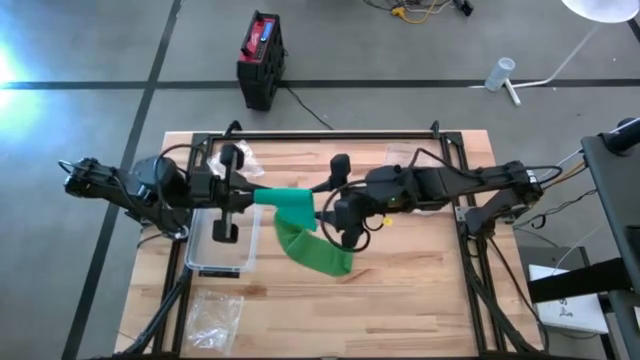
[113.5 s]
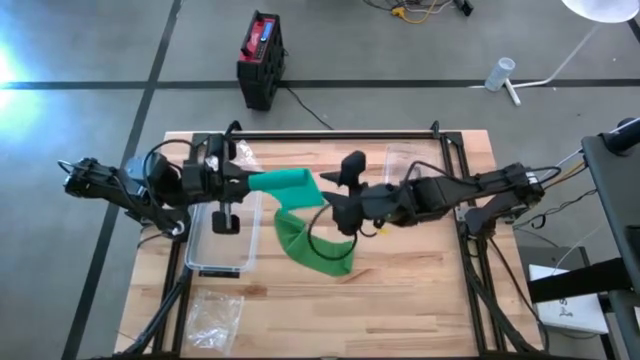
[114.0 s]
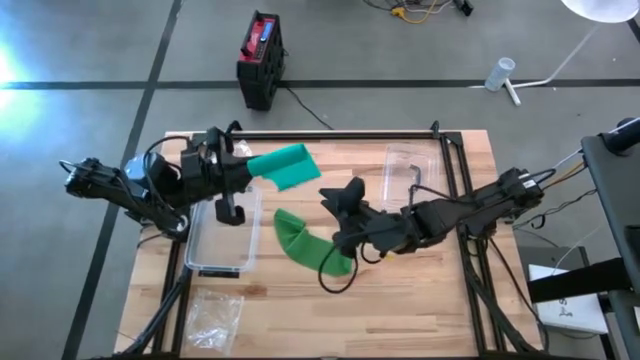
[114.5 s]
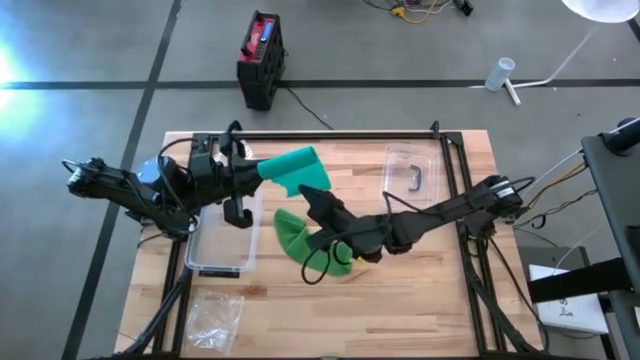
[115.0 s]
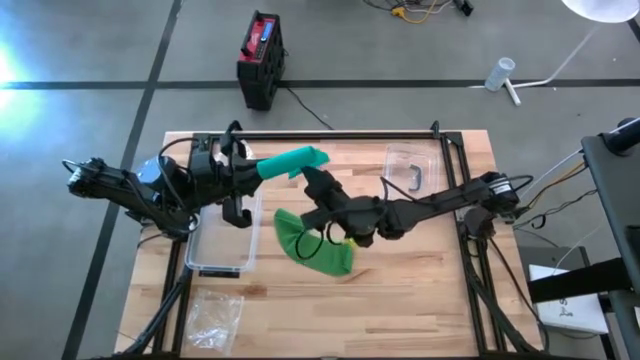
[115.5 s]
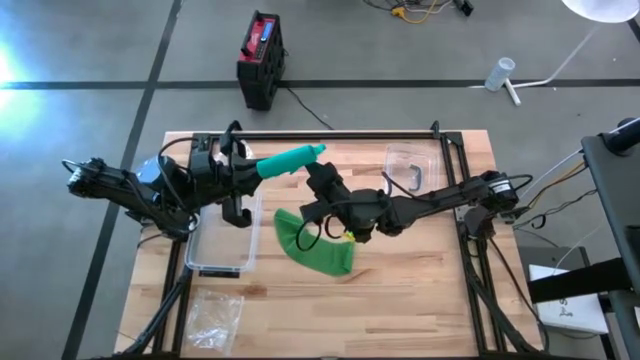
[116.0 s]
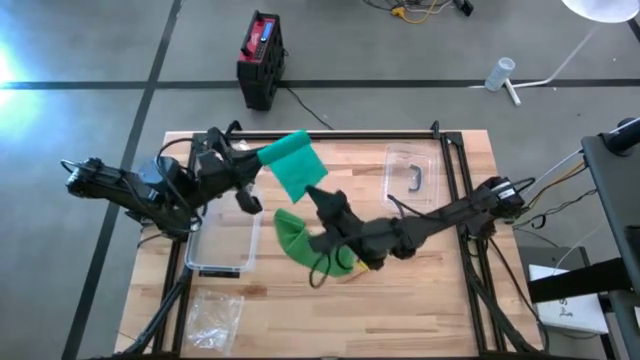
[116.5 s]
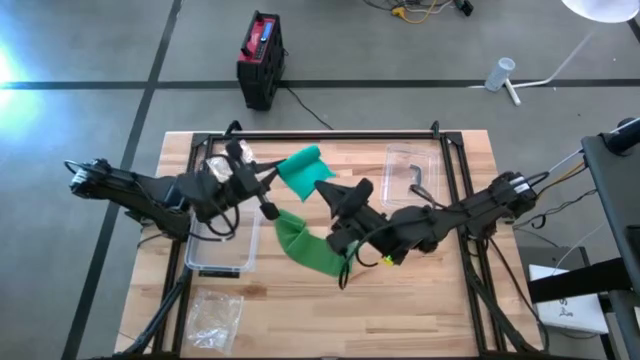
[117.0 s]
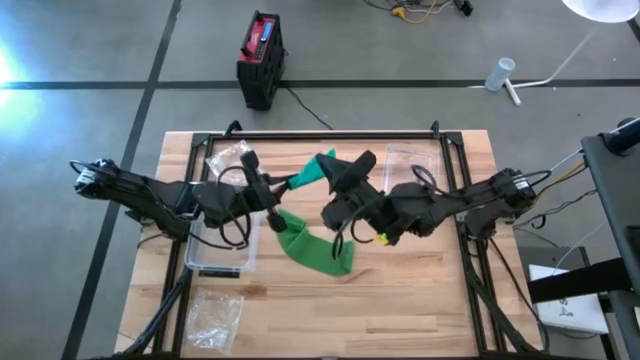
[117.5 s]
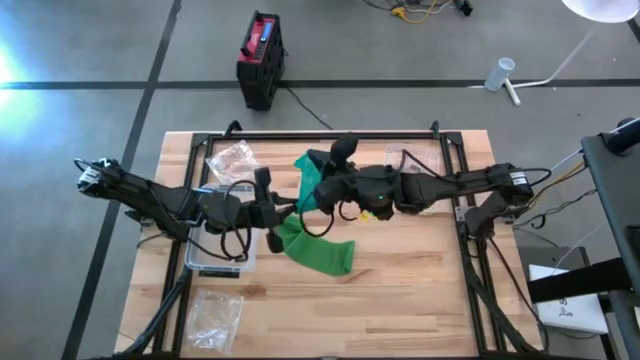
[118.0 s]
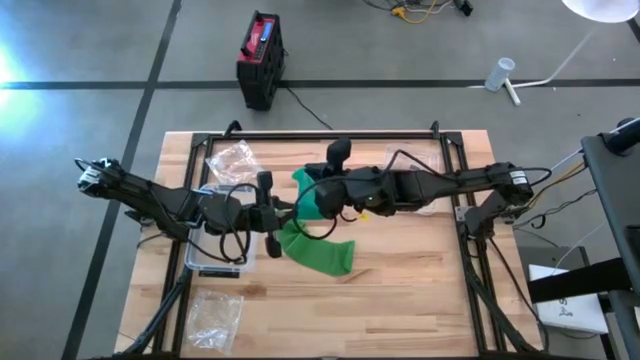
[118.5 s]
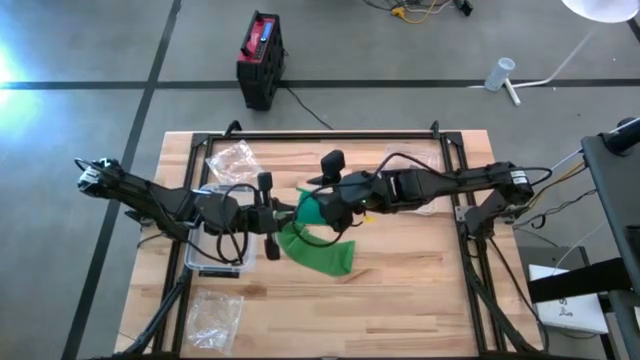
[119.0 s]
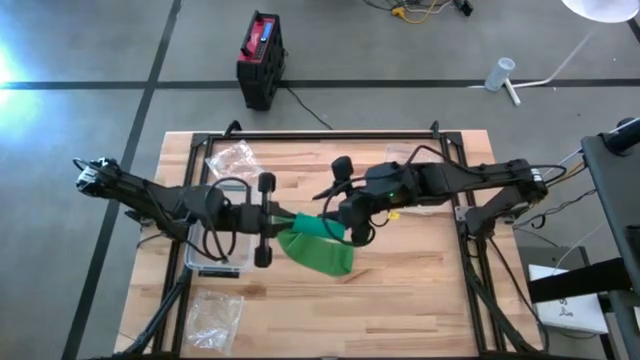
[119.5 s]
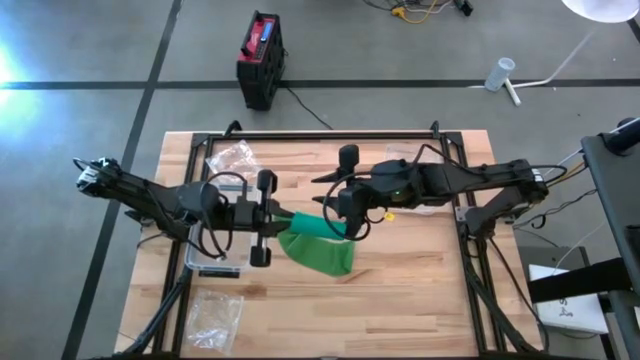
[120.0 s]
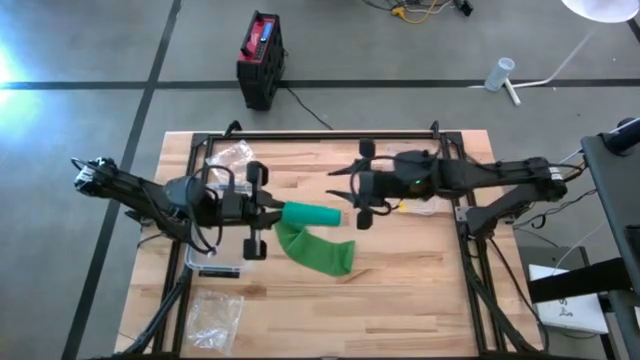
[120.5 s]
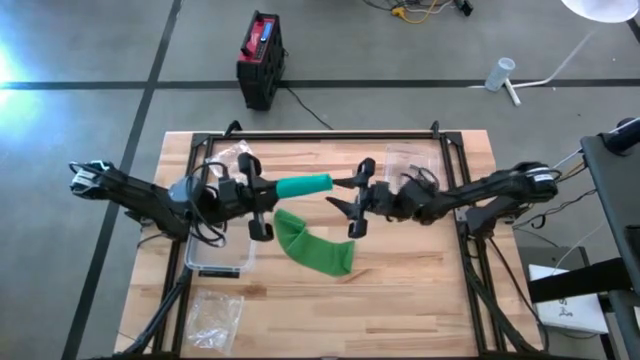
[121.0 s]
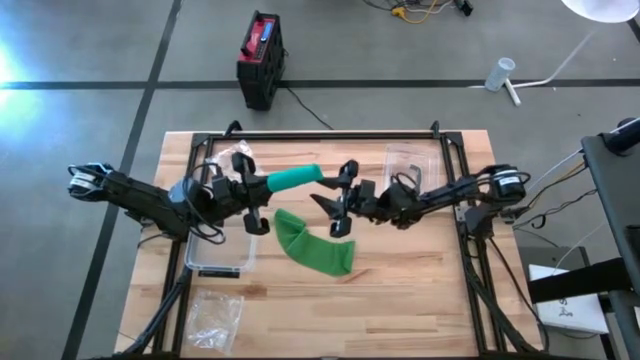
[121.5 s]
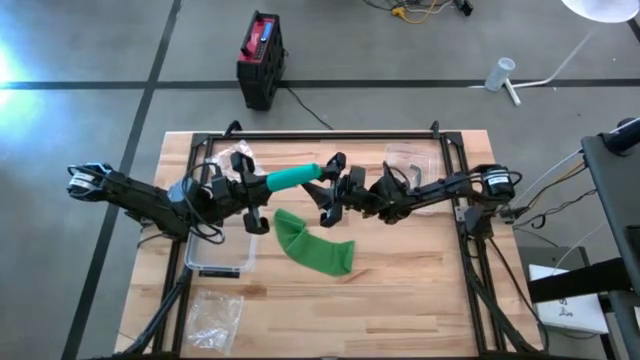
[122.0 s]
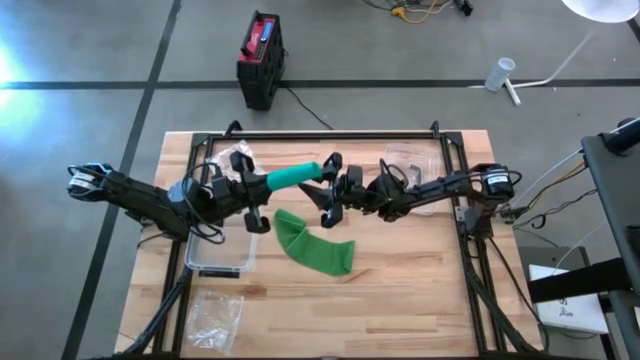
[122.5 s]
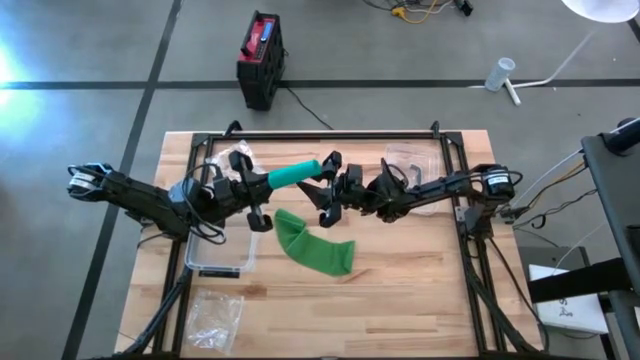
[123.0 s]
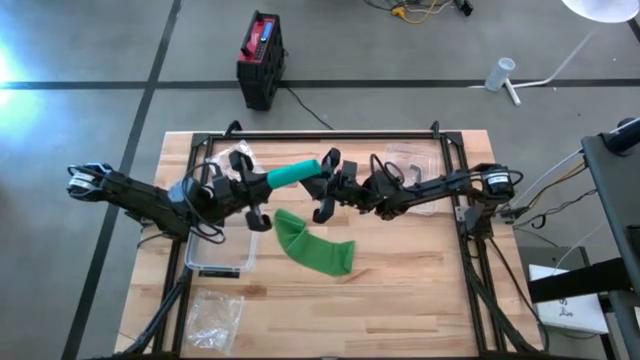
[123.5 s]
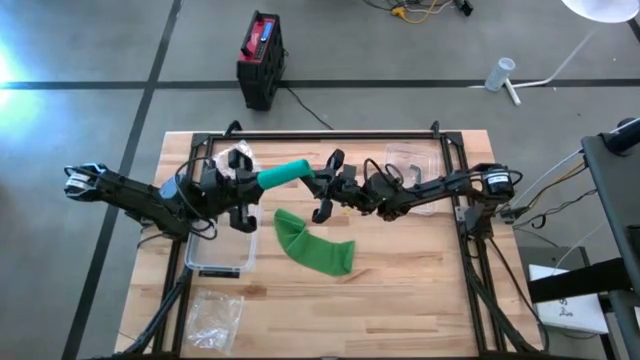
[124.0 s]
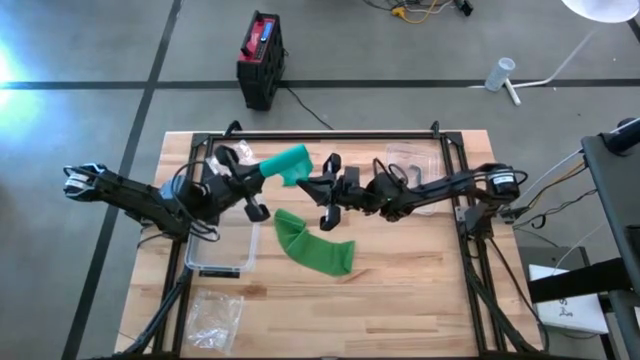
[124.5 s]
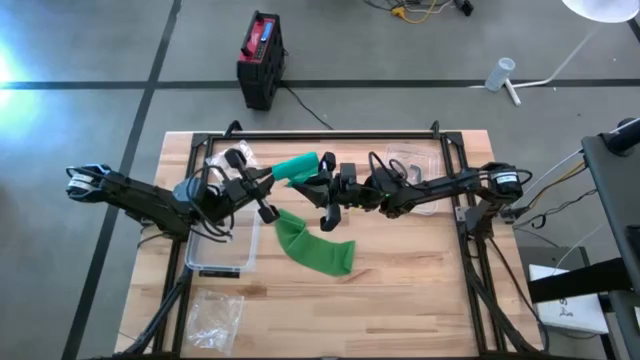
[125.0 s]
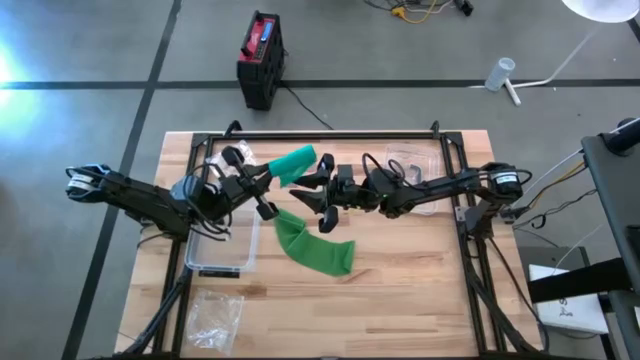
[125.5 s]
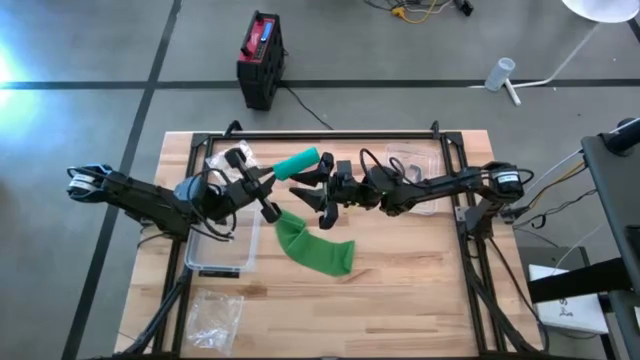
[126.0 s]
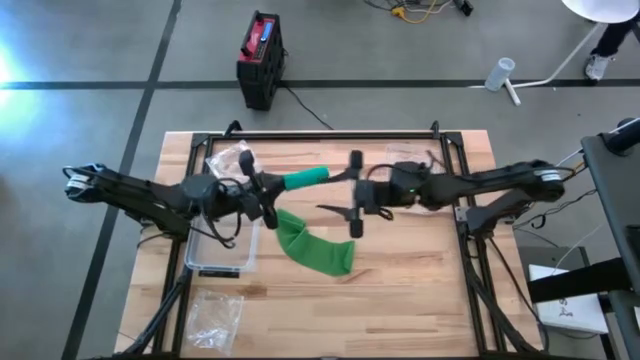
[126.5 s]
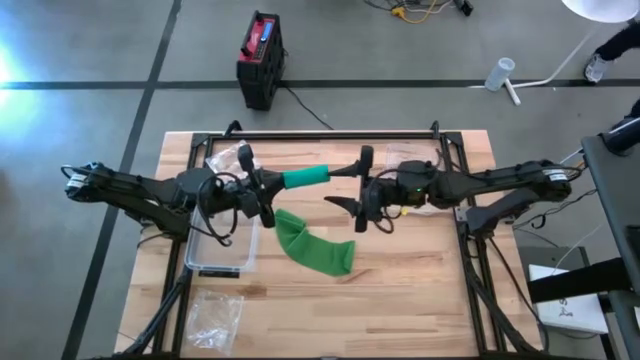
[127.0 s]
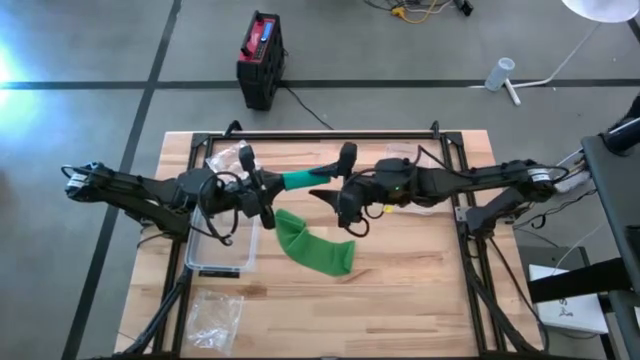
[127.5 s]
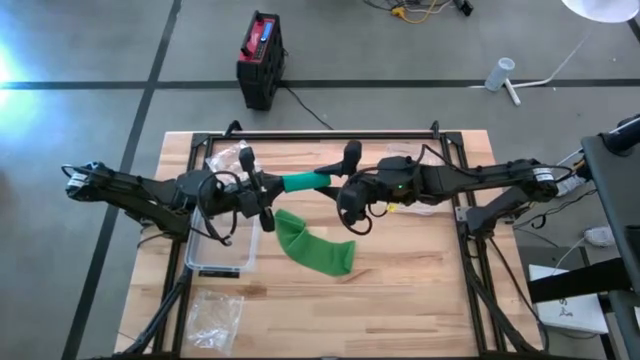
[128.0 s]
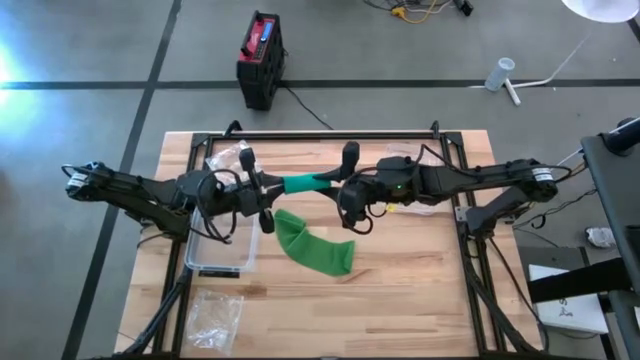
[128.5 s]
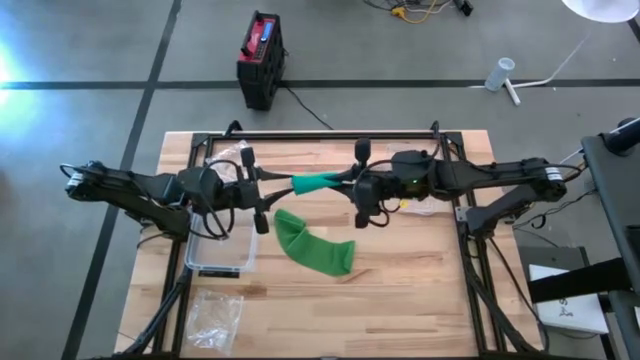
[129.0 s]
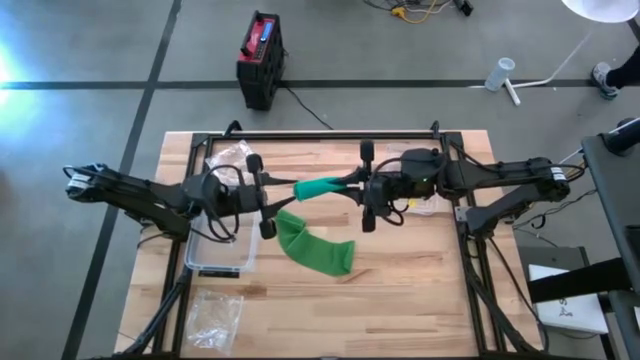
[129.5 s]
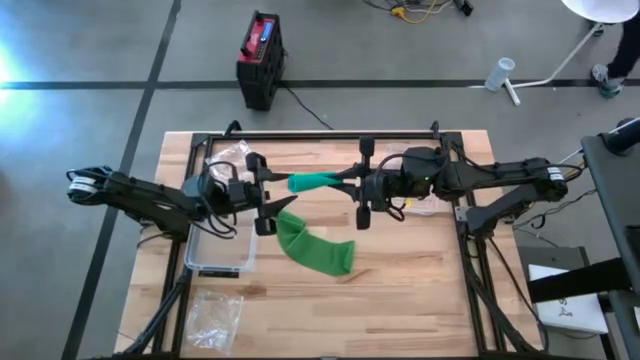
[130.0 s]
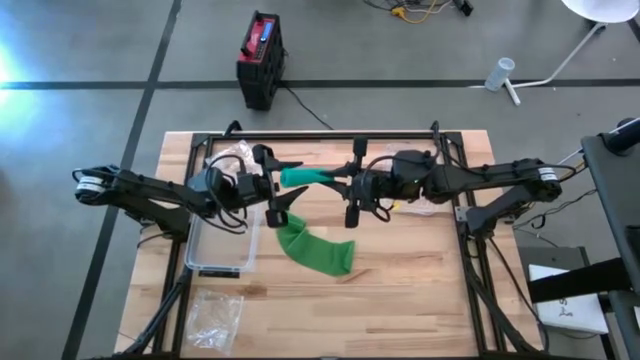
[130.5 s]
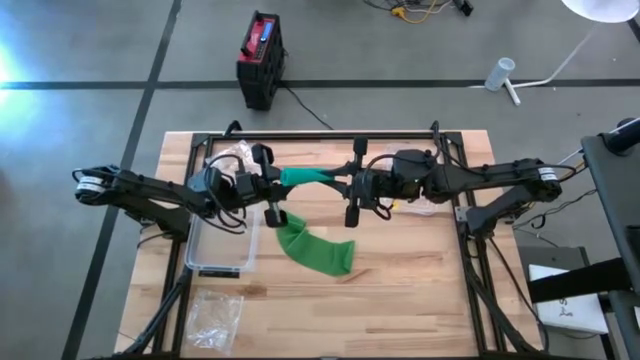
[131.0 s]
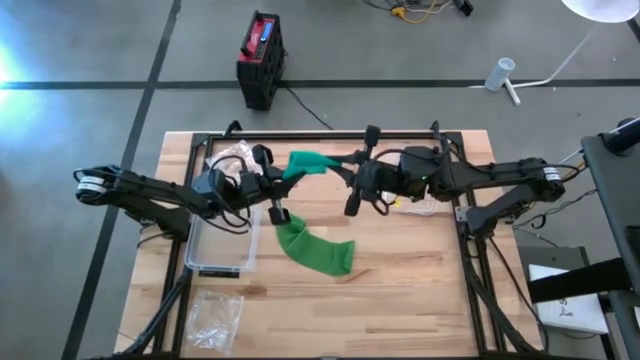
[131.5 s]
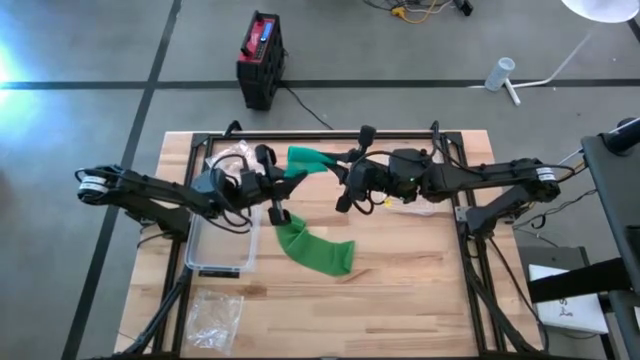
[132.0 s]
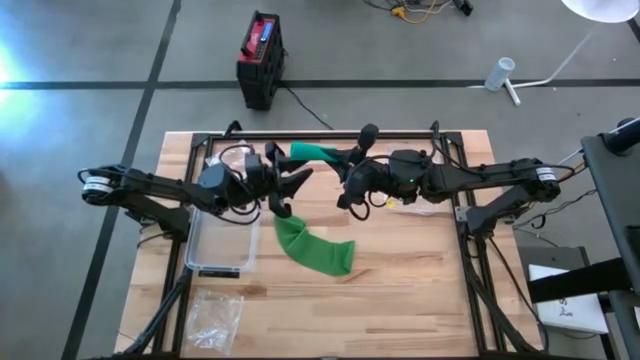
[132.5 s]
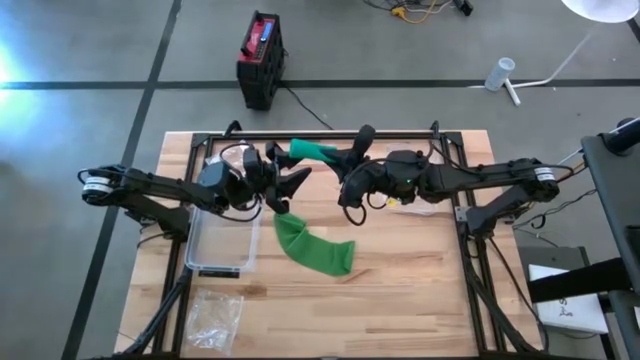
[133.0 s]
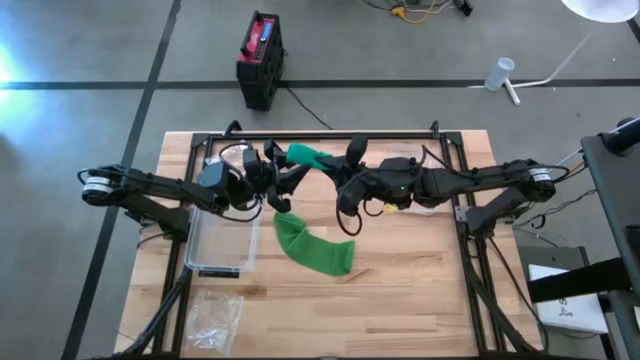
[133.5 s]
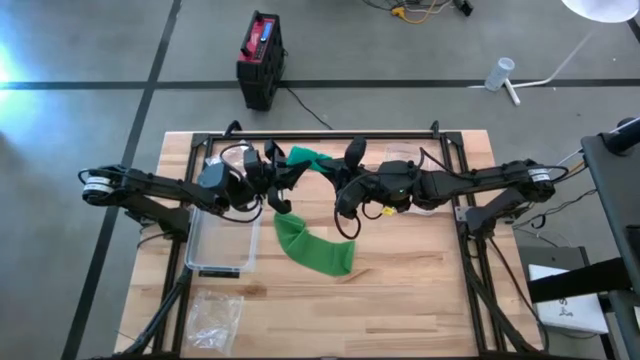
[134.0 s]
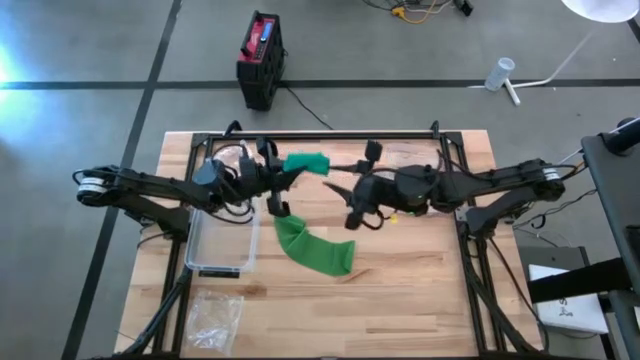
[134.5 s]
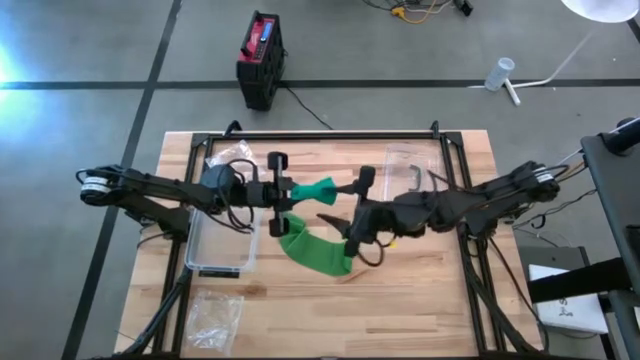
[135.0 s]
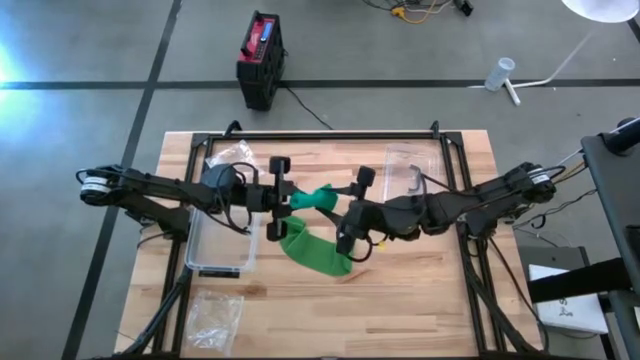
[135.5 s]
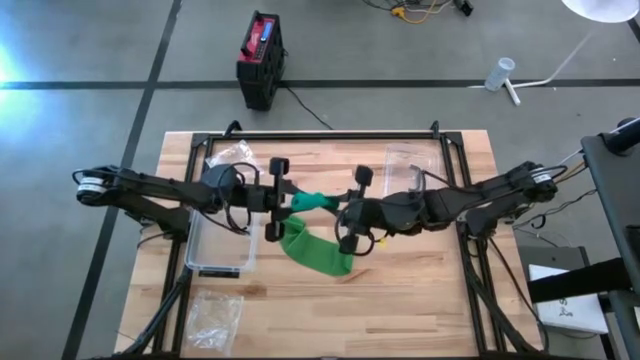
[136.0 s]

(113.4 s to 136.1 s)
Task: Roll bandage
Roll the light green bandage
